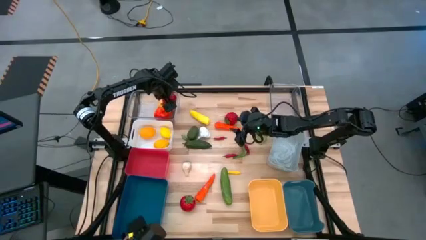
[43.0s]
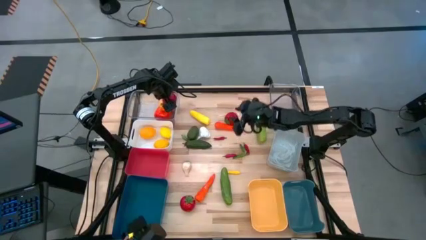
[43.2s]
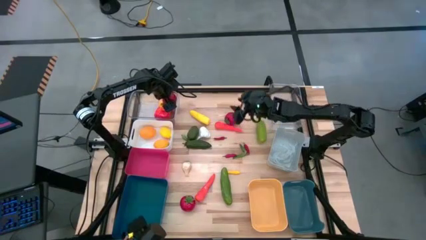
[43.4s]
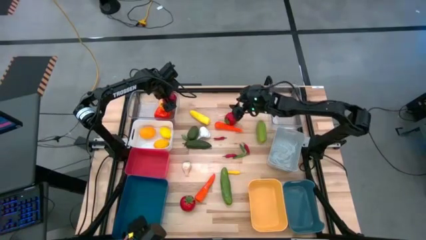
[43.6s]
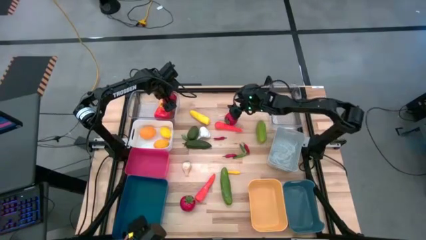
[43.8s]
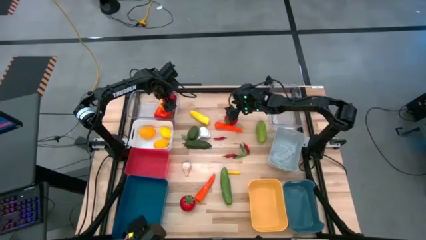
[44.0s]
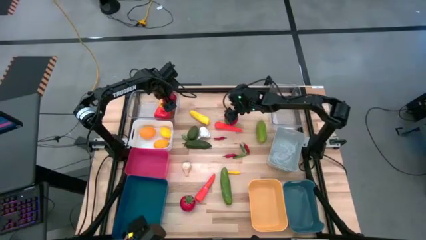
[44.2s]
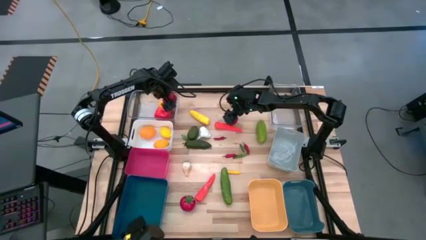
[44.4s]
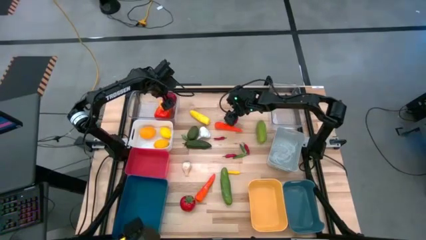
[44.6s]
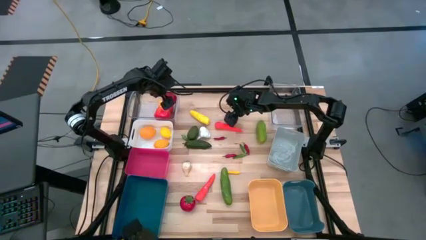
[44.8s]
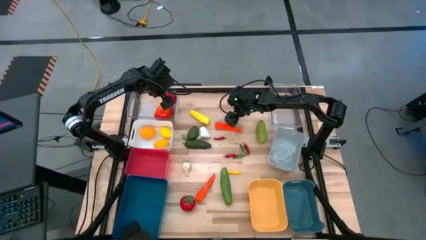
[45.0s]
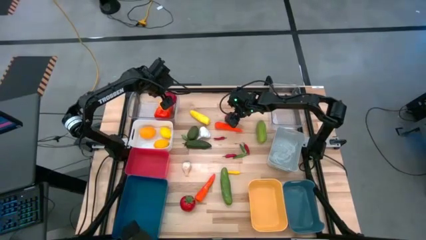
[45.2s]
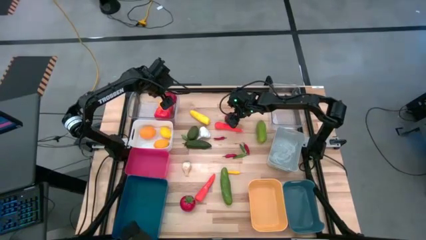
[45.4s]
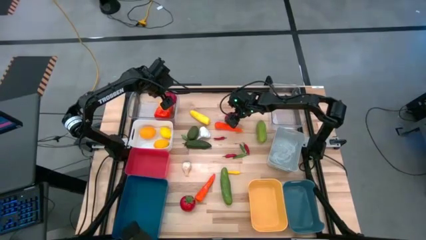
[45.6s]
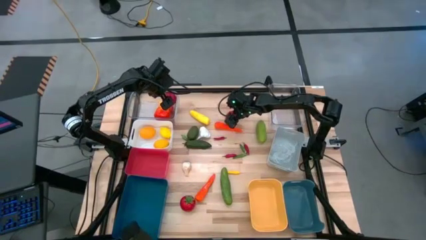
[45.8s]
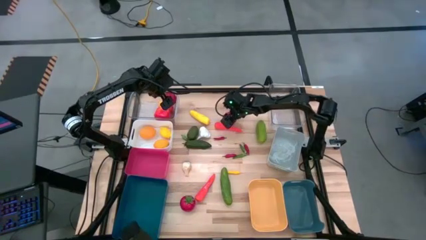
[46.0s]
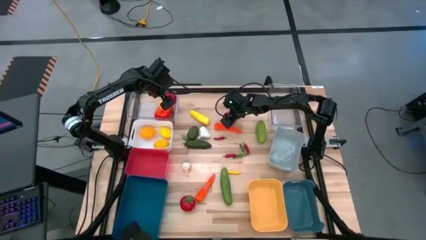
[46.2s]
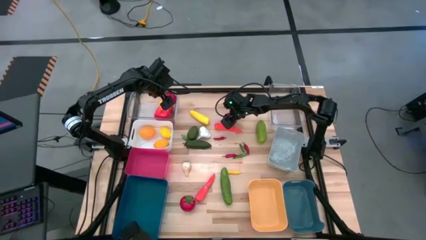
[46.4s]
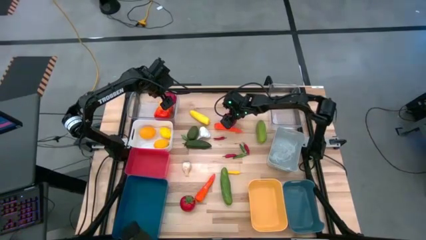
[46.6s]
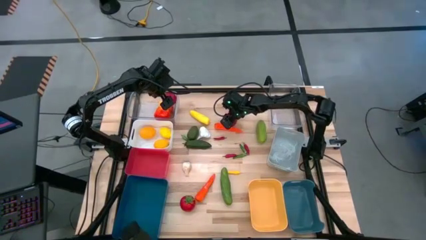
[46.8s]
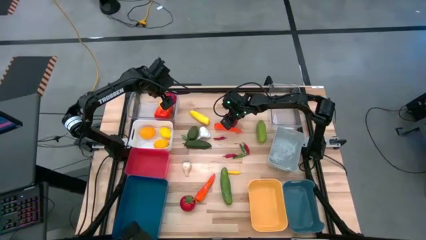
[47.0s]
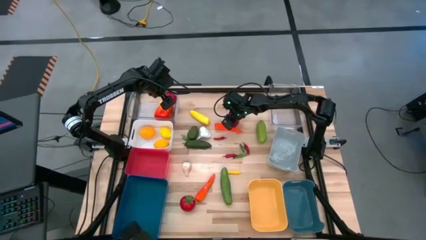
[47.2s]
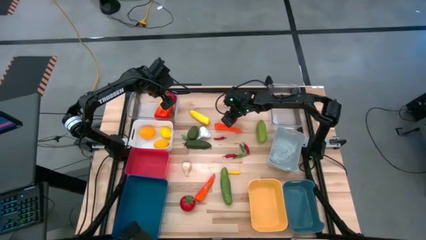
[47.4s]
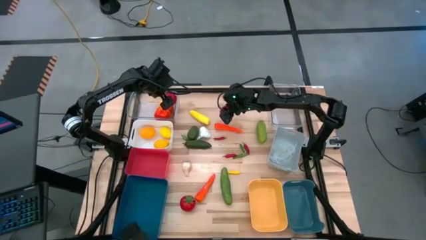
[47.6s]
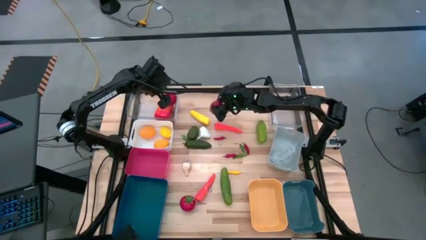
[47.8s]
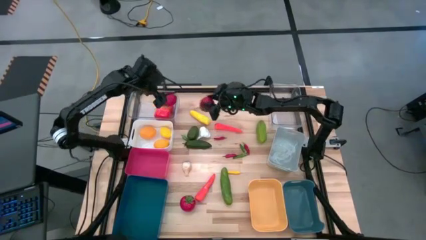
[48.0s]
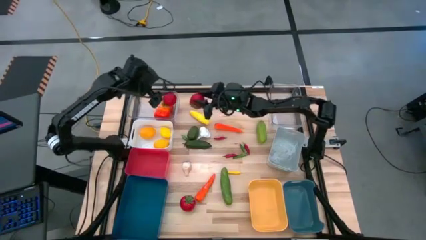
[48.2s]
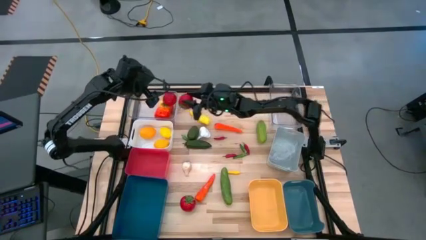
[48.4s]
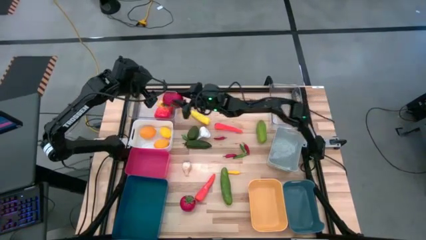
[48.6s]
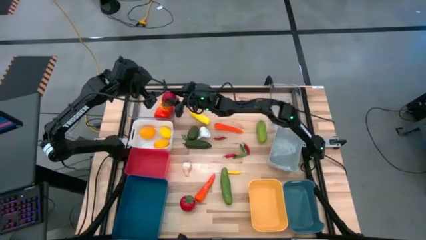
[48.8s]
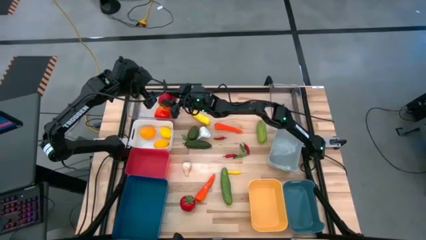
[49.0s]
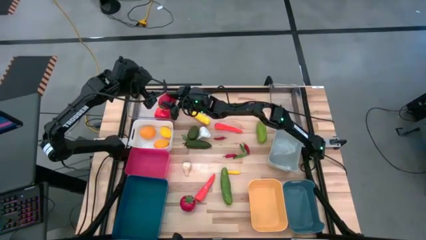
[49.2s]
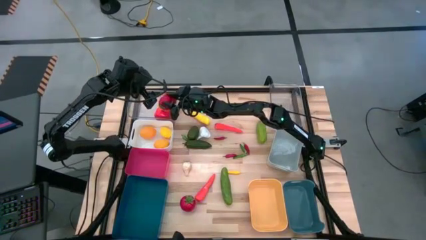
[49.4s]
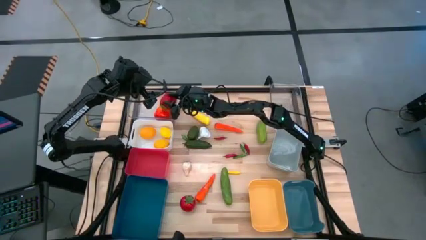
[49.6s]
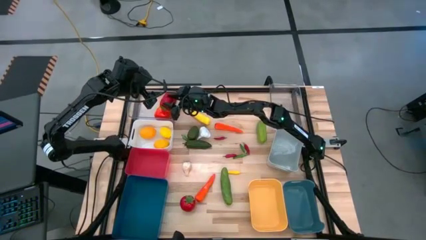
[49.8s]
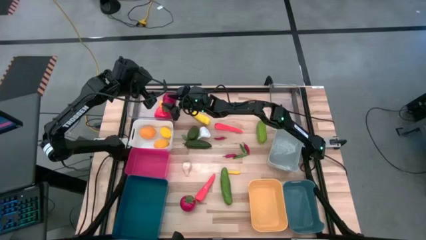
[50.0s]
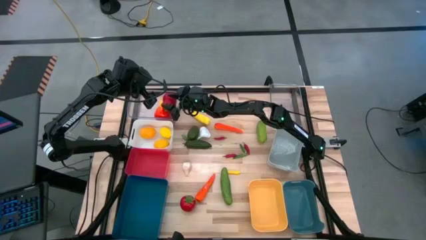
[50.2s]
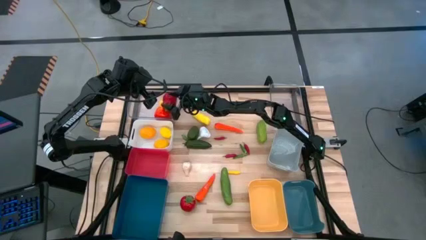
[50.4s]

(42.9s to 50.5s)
Task: Sort produce into baskets
Put the top red tomato into the left transparent bin

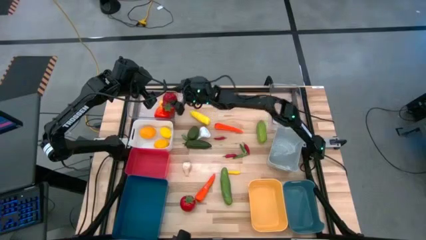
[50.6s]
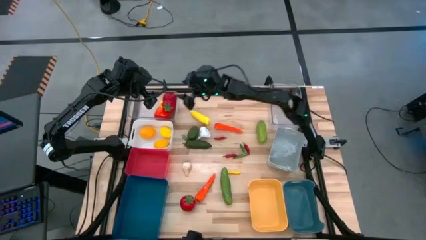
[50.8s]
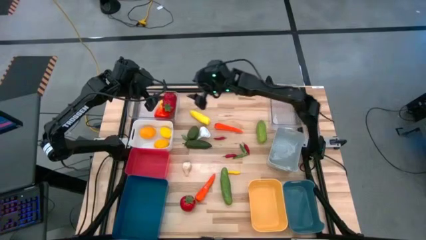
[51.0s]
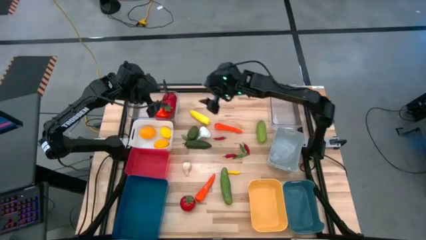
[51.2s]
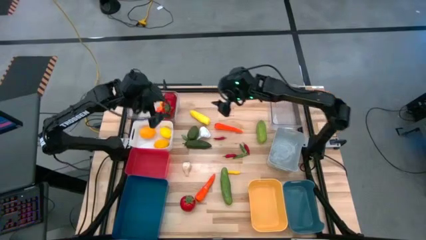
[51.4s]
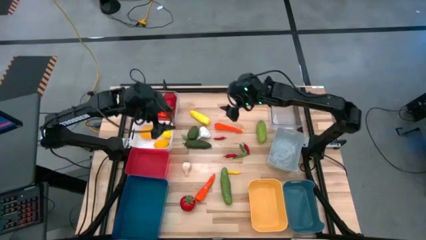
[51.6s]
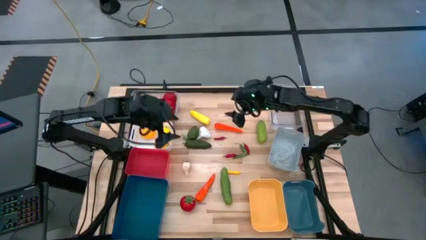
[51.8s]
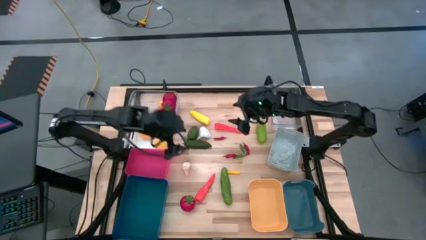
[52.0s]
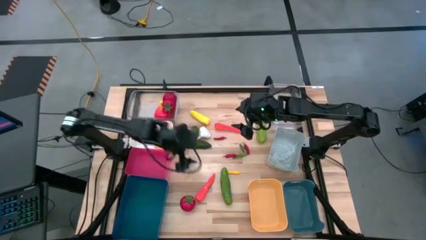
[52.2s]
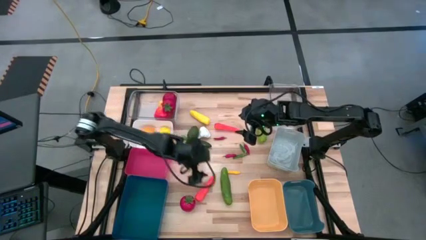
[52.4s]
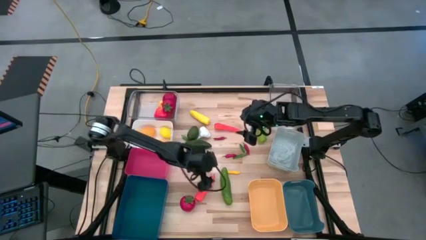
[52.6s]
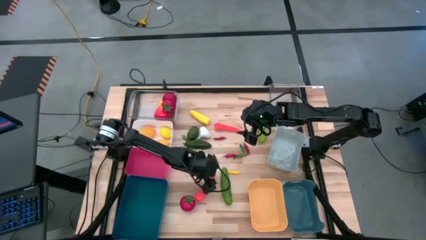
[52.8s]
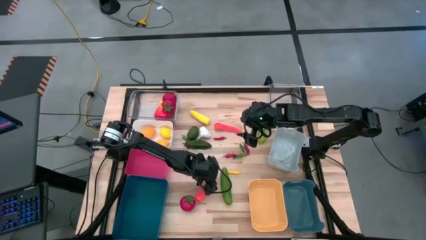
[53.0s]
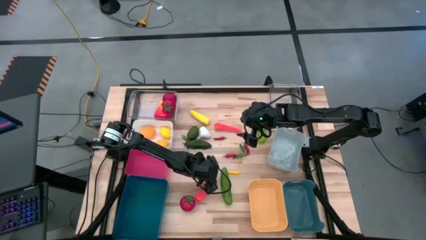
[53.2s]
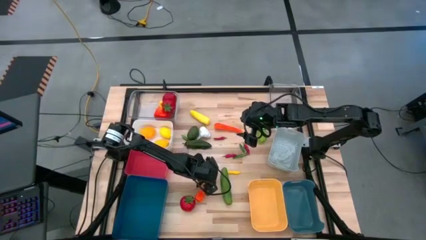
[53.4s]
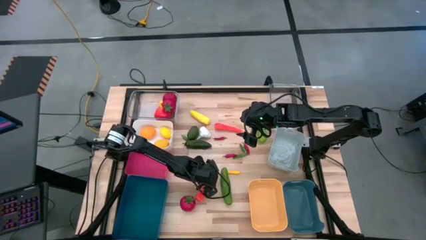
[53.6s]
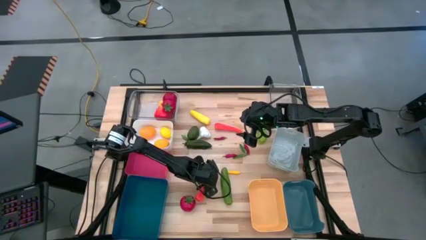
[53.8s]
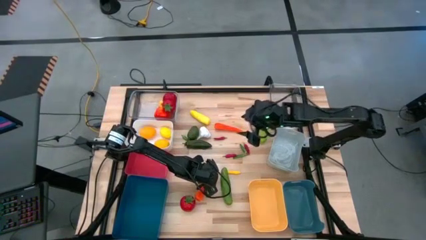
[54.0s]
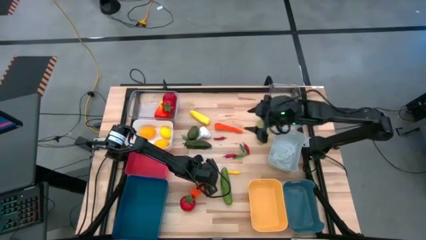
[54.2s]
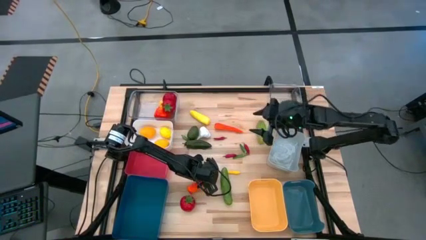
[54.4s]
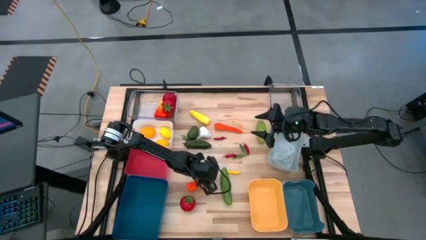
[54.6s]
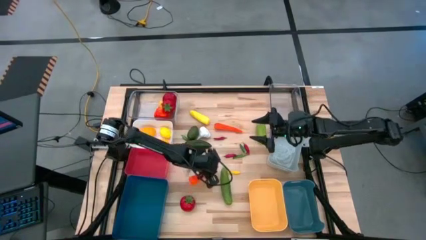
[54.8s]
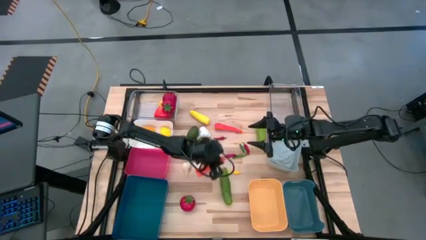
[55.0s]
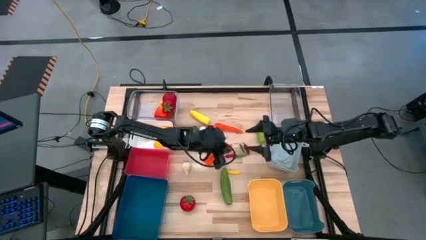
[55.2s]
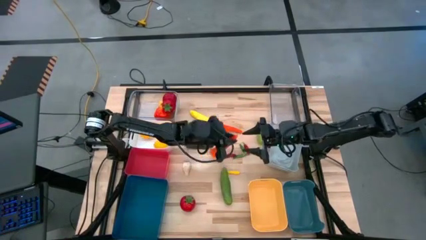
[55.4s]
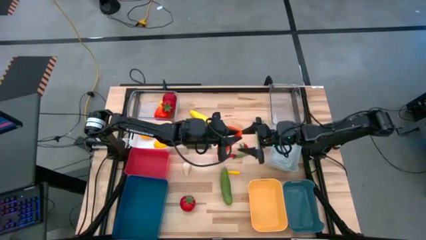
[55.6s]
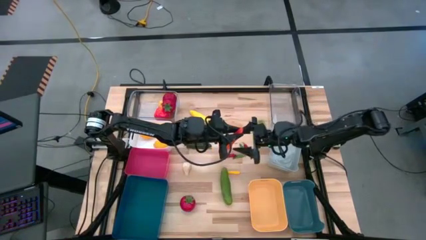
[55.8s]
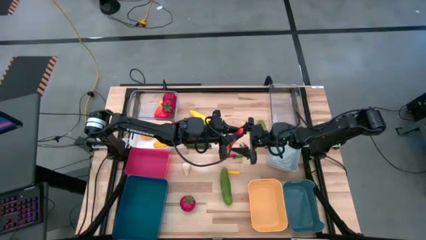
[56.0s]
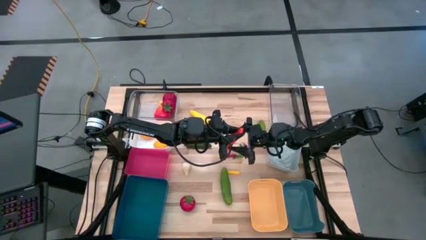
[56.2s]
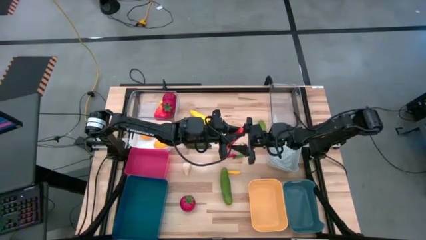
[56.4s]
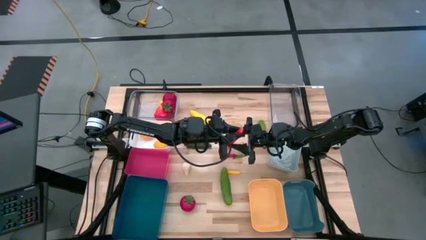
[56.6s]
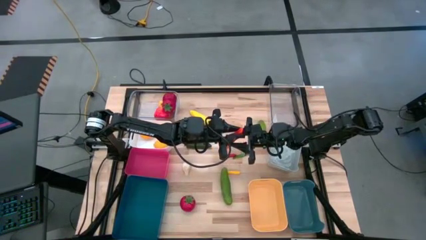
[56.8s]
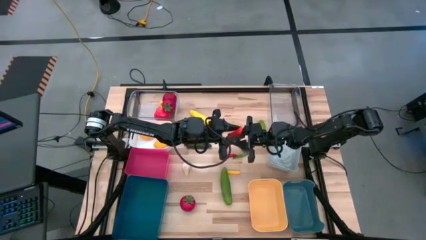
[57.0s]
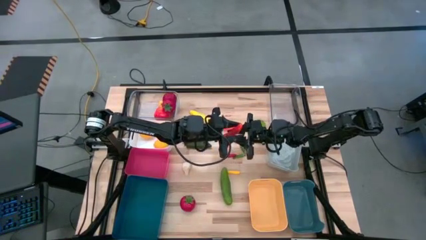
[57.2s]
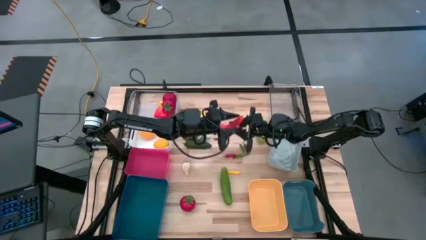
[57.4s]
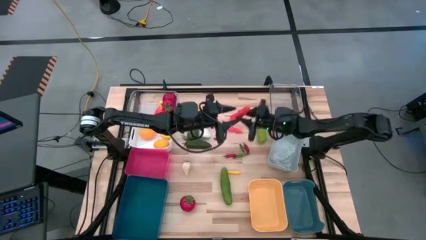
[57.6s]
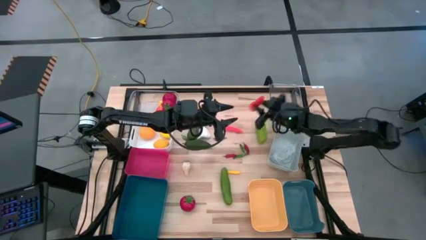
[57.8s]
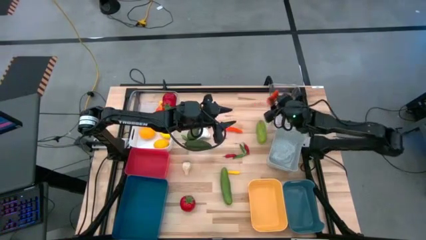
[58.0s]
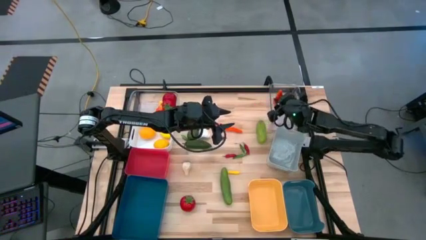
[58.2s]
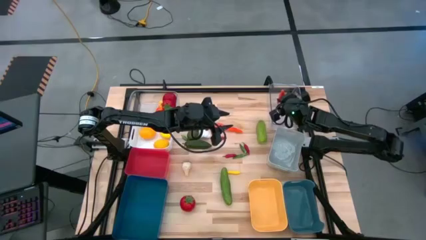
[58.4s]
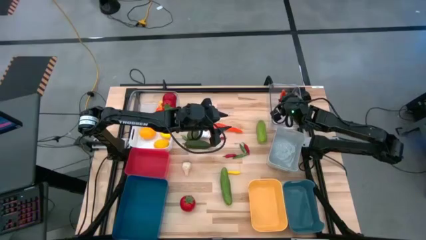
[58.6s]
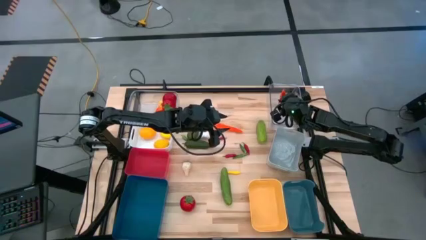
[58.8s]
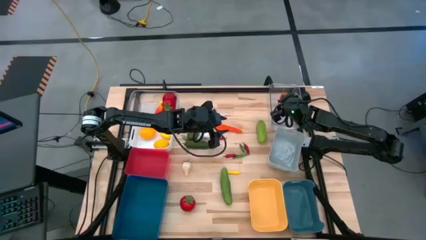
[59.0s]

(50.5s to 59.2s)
Put the bottom orange carrot into the right transparent bin

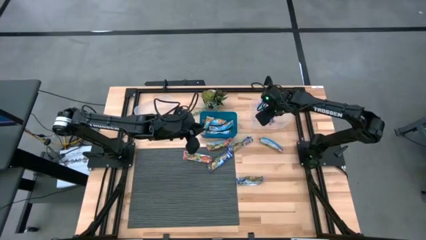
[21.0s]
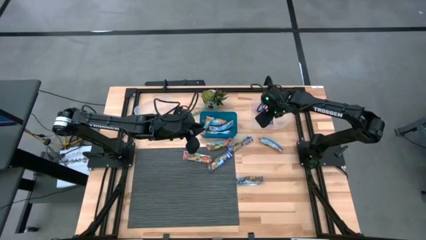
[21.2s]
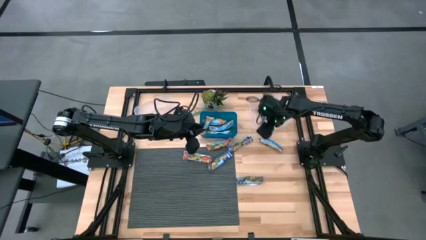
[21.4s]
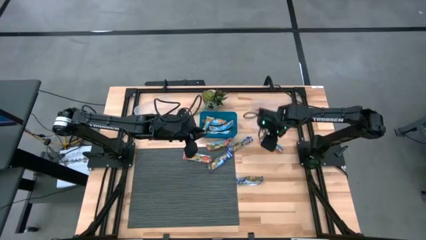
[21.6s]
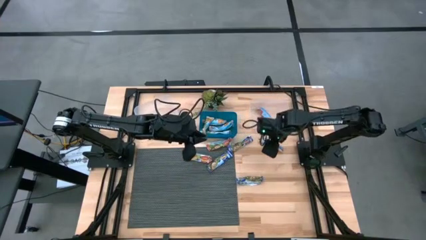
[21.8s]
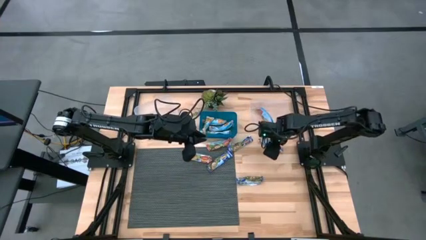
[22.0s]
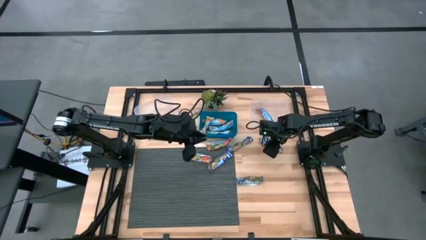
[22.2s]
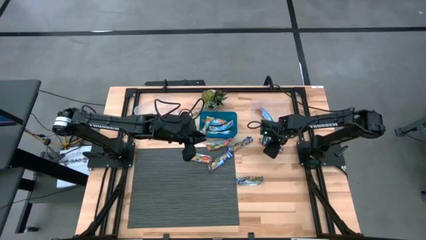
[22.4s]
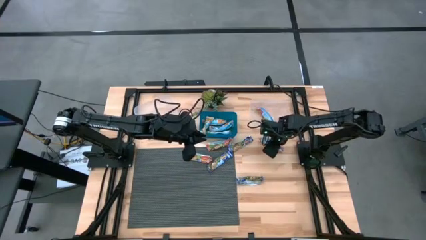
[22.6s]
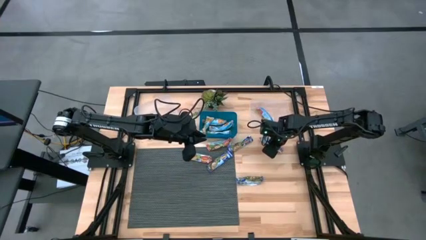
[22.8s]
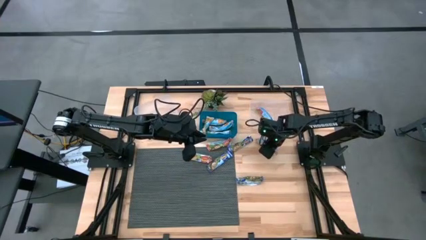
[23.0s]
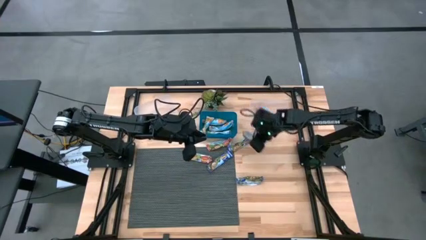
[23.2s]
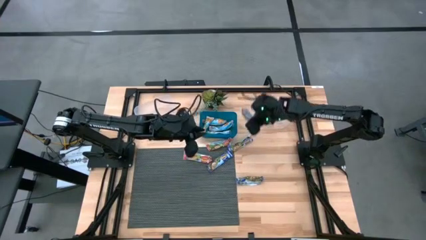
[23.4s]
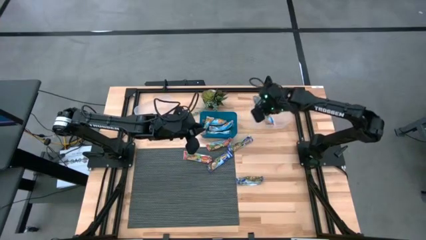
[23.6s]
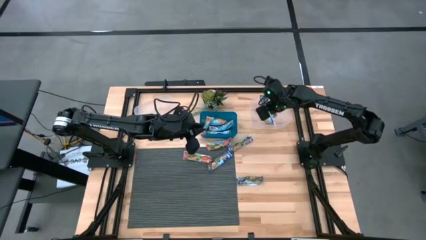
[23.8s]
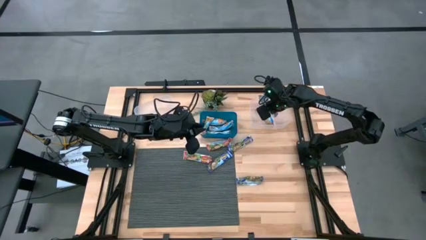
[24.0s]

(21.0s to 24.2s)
Task: Pick and place Granola Bars by type
Put the red granola bar into the right transparent bin
